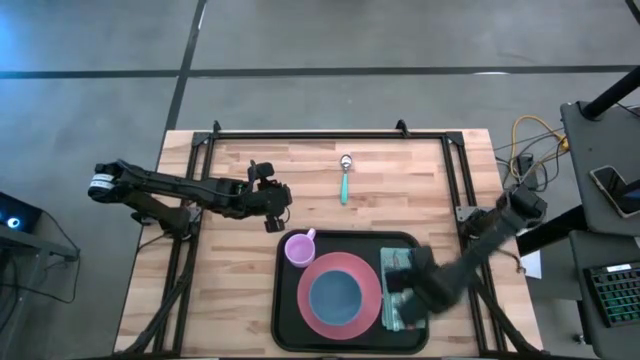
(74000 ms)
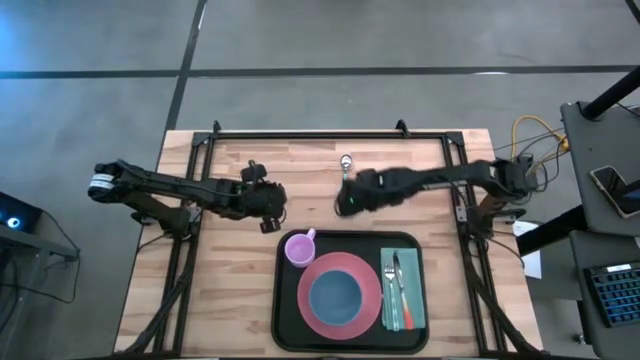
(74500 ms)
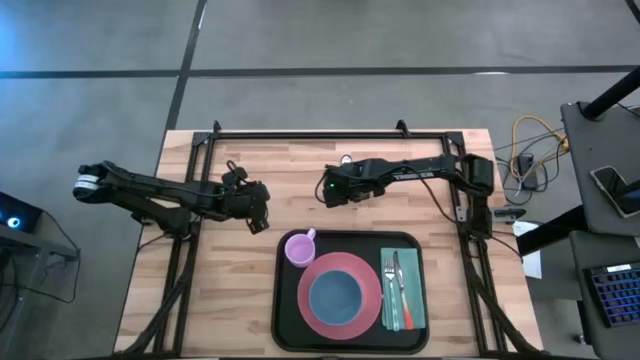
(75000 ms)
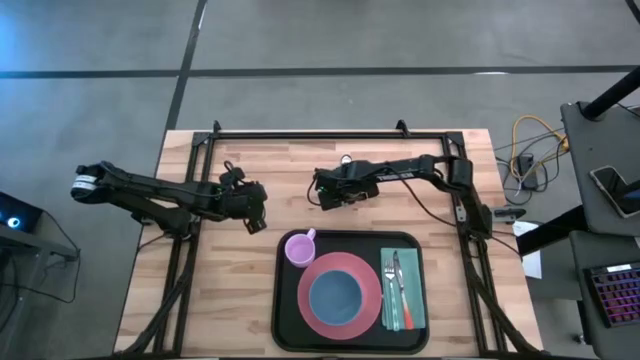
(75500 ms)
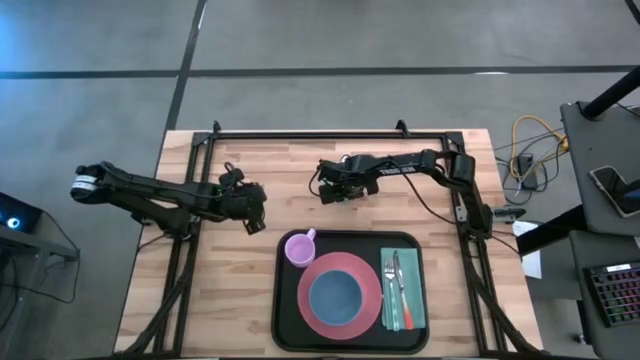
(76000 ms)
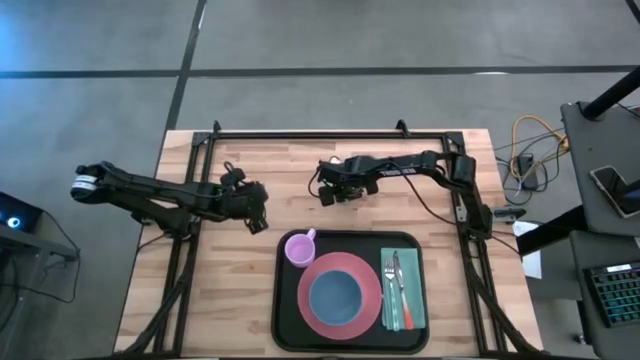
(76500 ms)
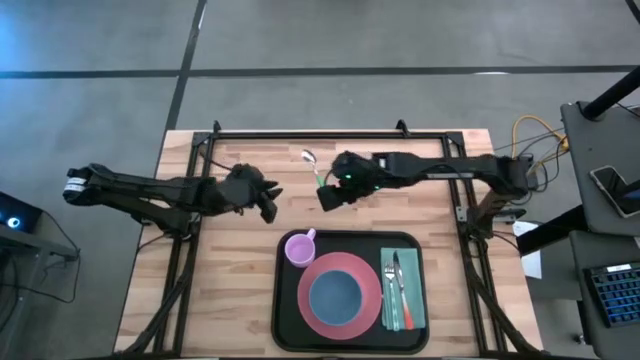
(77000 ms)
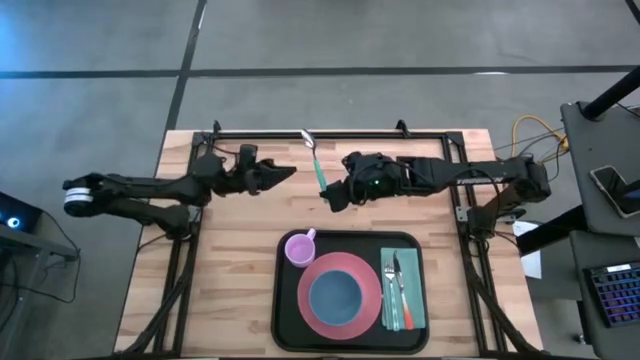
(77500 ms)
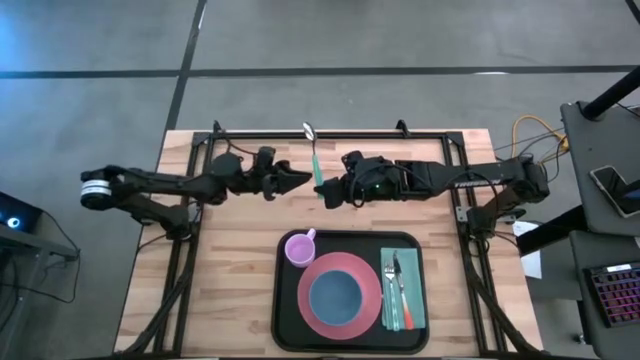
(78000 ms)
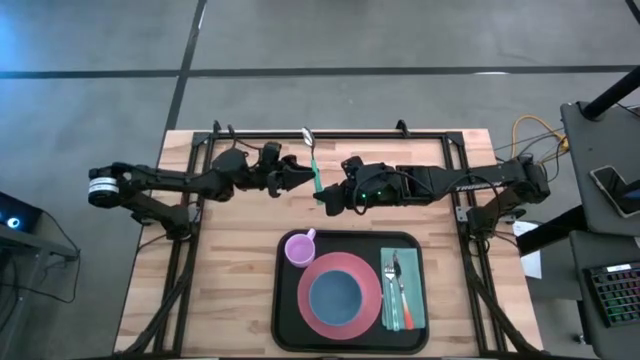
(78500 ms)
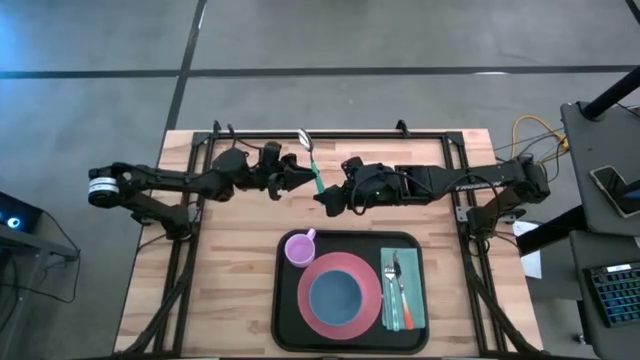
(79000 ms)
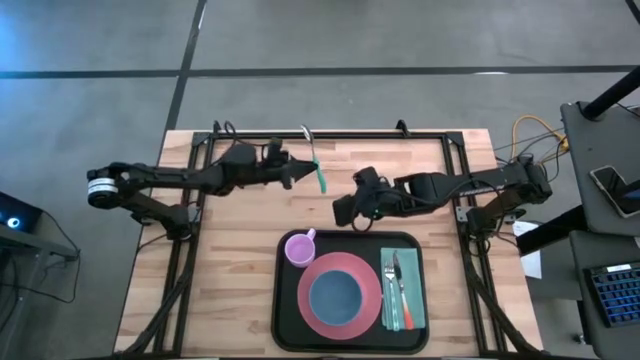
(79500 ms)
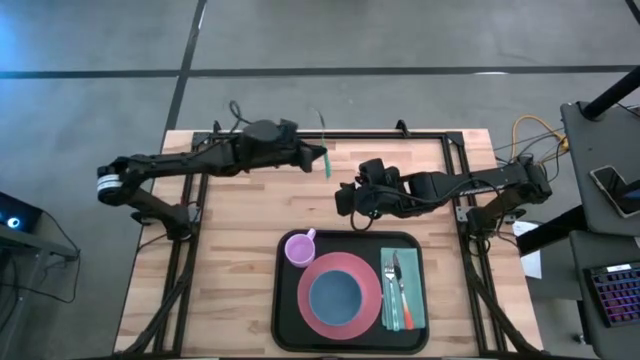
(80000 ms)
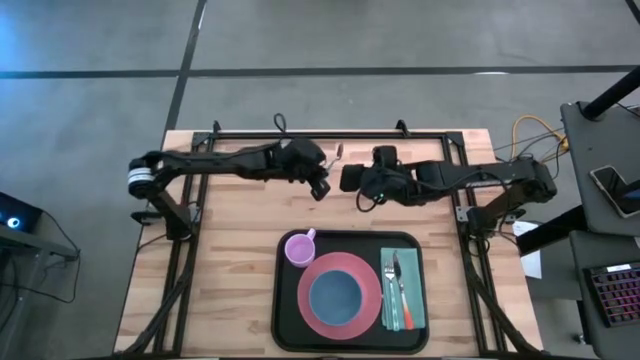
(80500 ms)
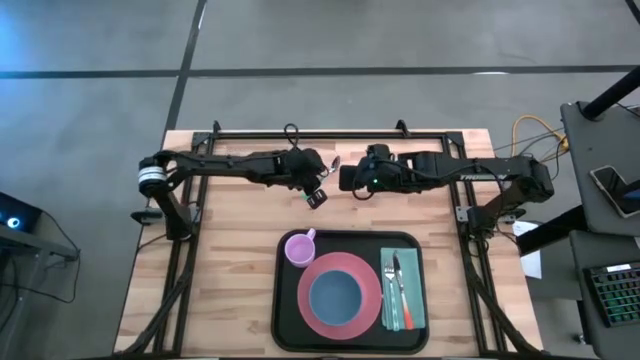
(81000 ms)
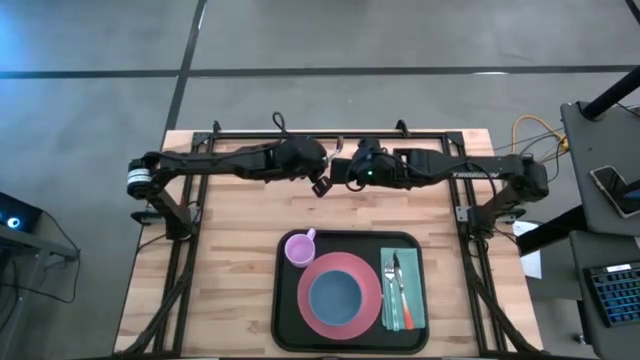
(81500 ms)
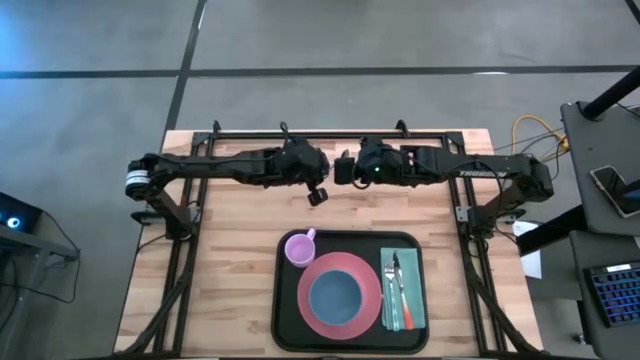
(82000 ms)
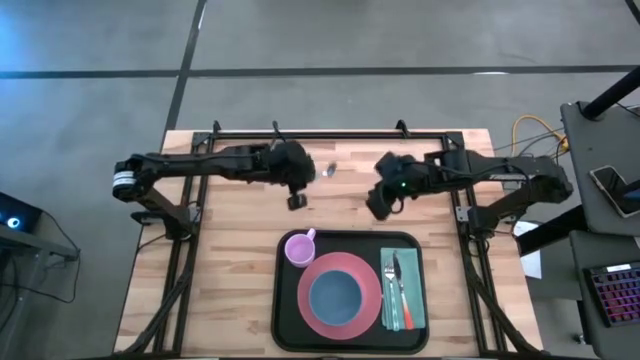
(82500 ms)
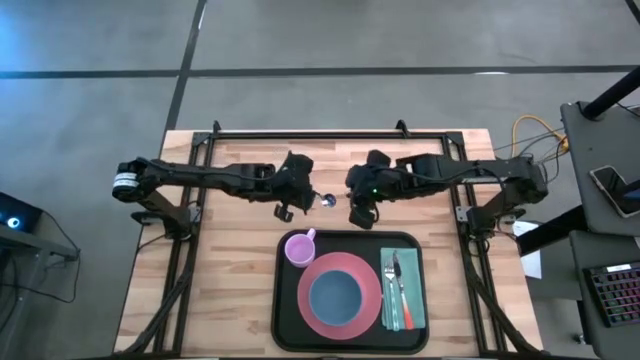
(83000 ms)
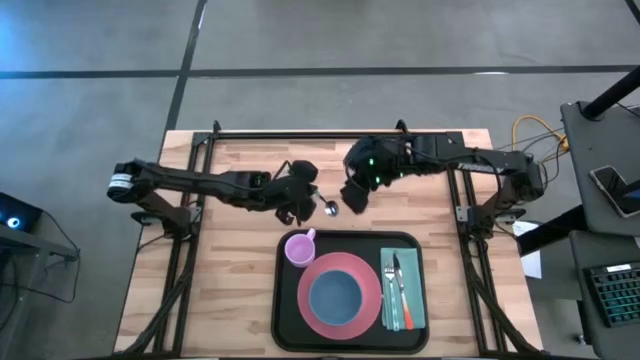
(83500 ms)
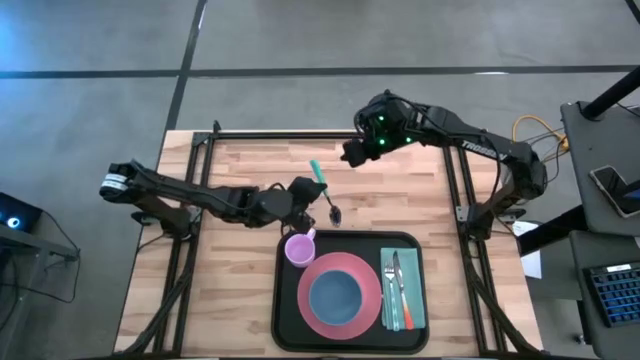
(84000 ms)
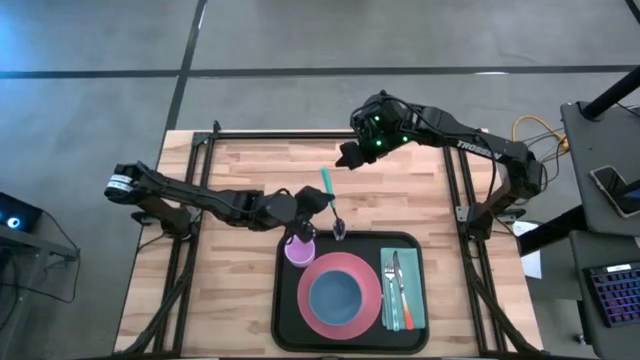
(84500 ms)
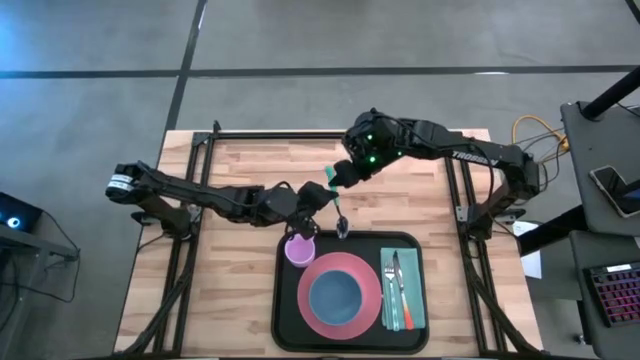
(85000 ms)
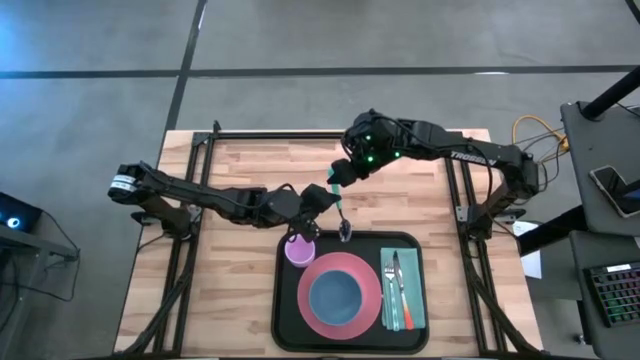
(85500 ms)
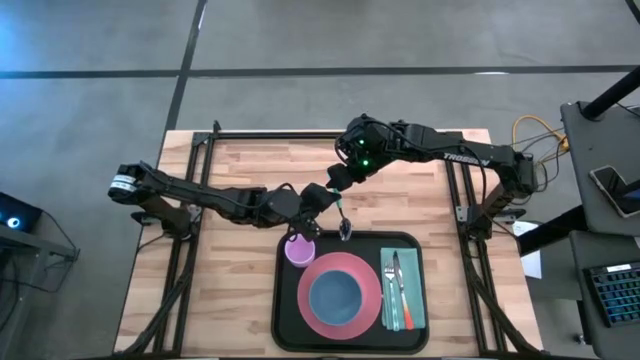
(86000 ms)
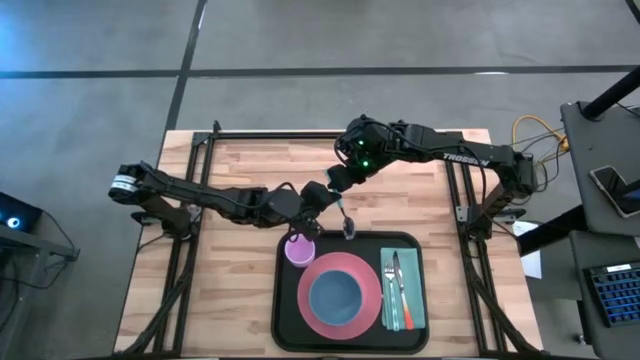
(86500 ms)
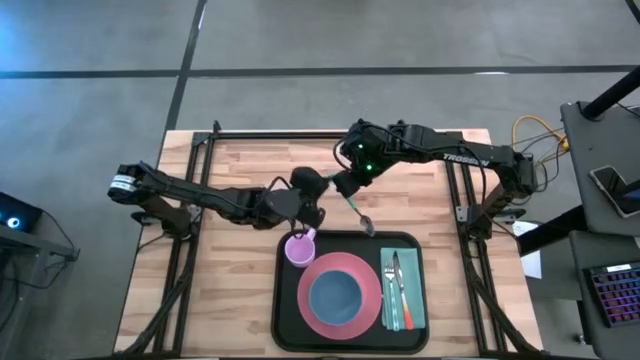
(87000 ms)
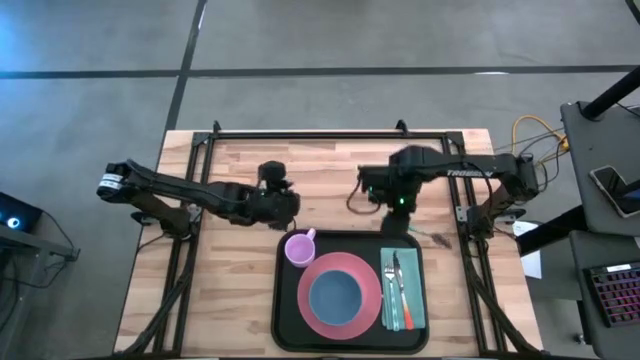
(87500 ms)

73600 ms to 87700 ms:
Task: Set up tray
Put the blue spoon on the blue napkin to the right of the orange knife

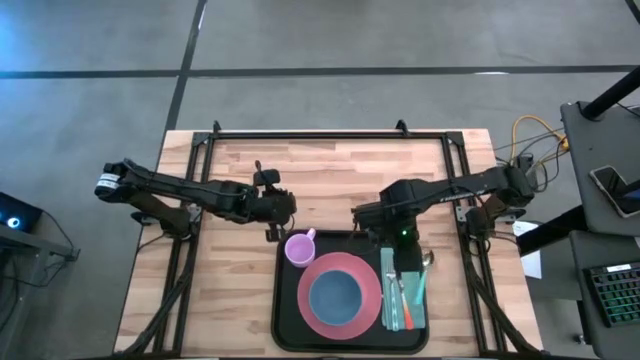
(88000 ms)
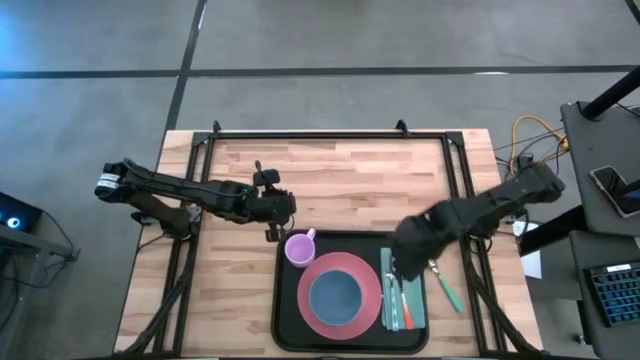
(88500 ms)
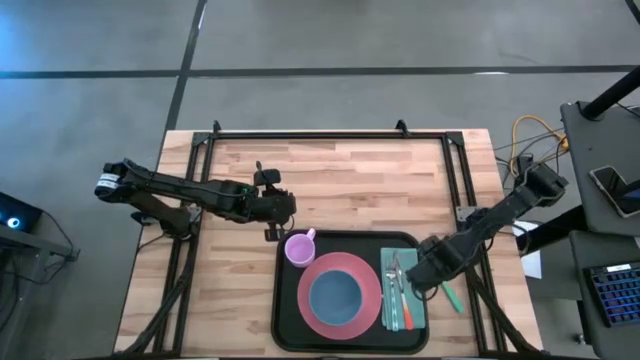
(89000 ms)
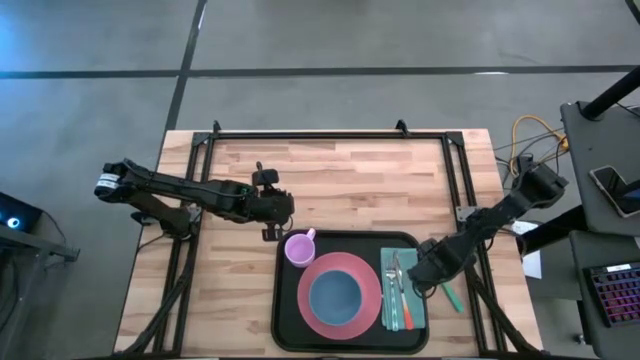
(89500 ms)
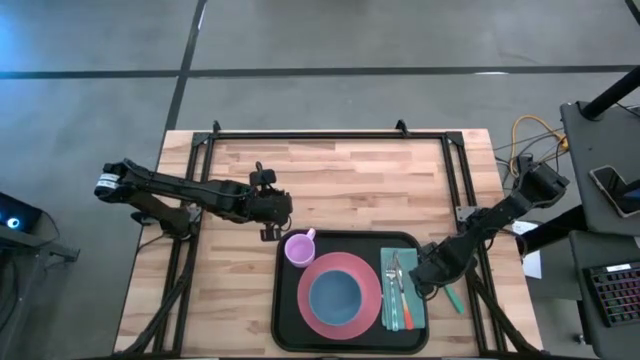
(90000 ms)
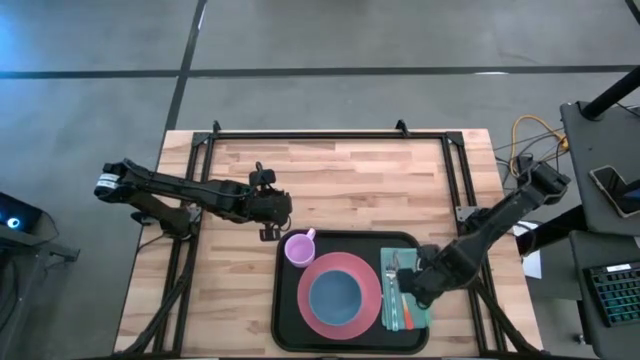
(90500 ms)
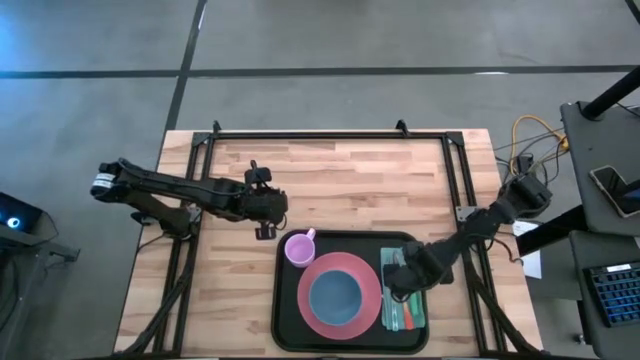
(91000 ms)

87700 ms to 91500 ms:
Put the blue spoon on the blue napkin to the right of the orange knife

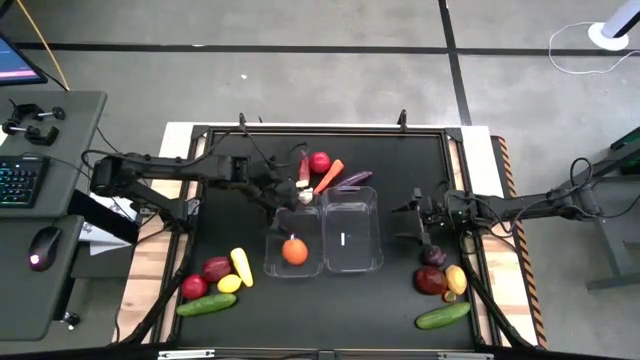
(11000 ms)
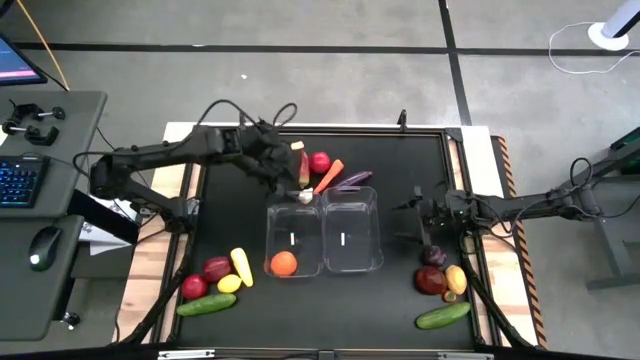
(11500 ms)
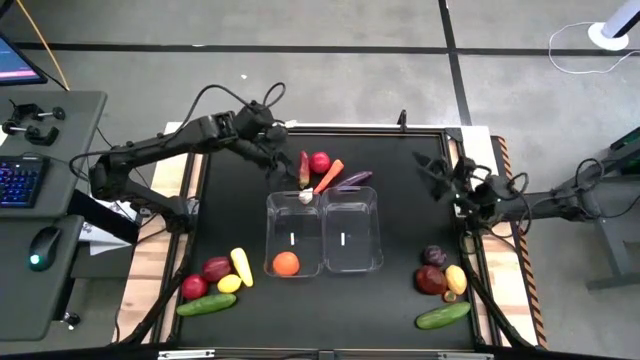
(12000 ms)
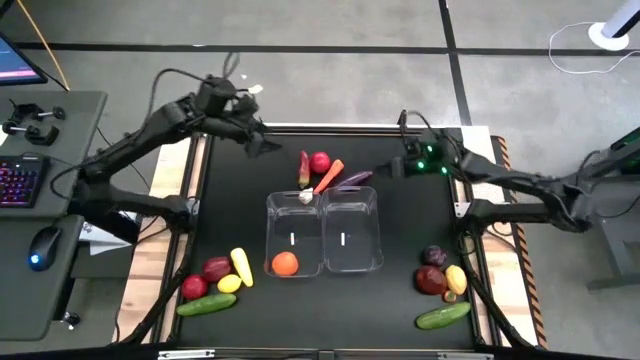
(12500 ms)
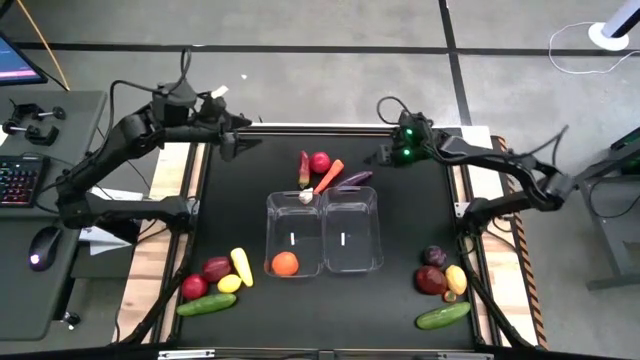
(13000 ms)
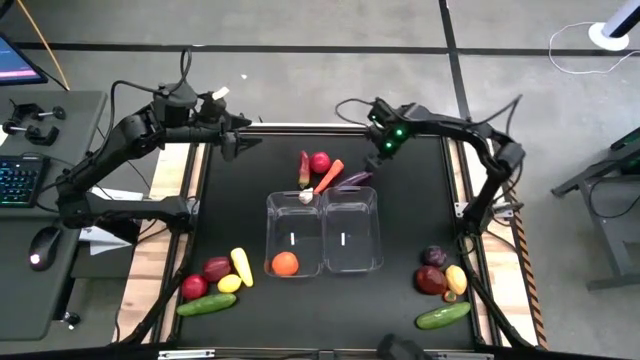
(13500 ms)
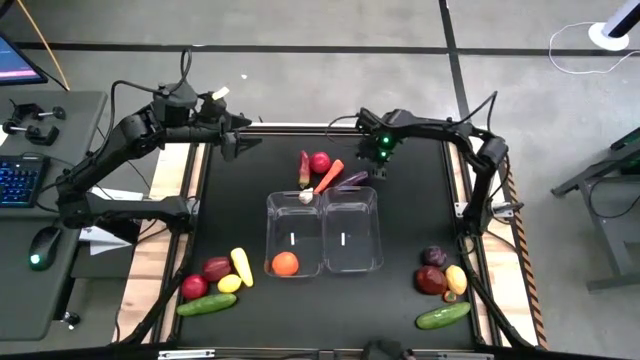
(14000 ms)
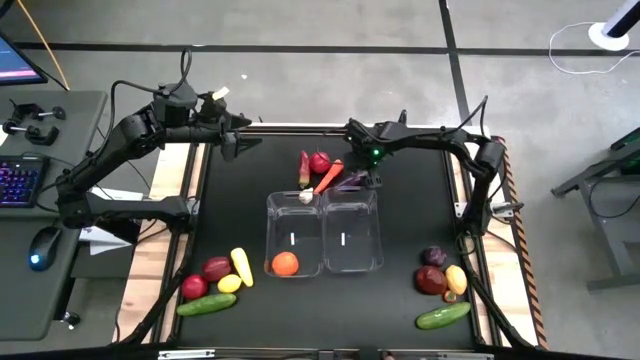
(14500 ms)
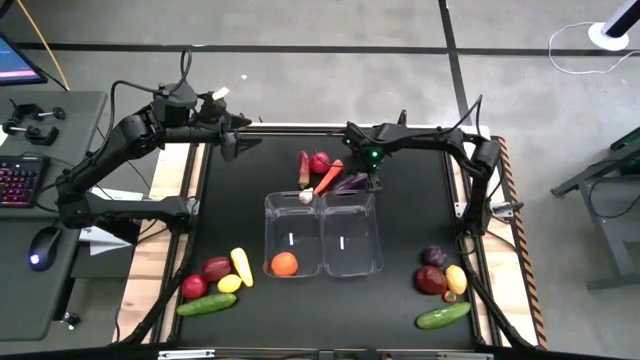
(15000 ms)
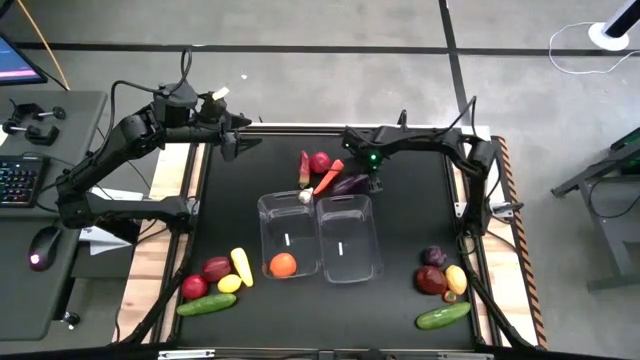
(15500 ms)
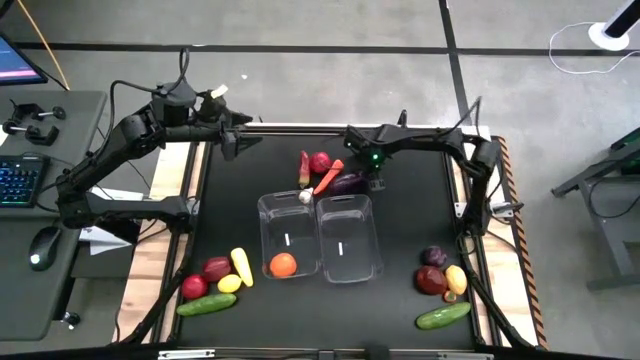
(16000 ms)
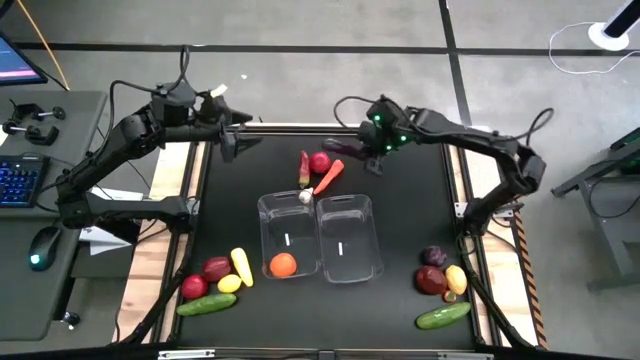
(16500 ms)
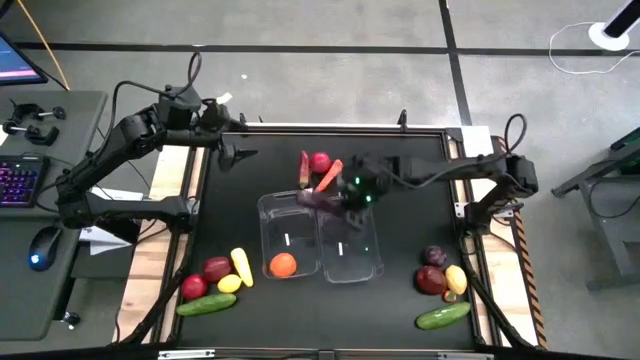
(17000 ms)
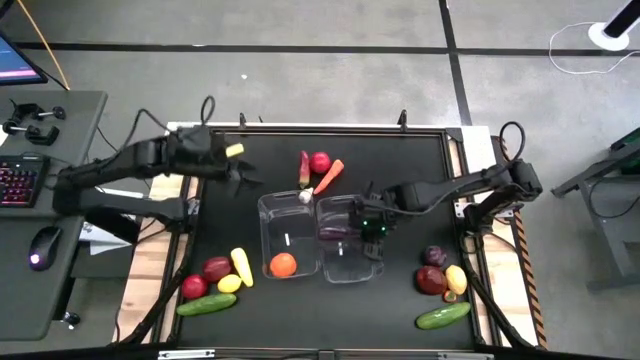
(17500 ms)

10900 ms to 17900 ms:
Task: Sort produce into baskets
Put the eggplant into the right transparent bin
